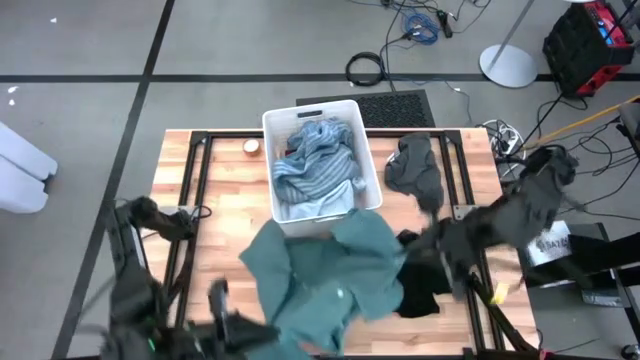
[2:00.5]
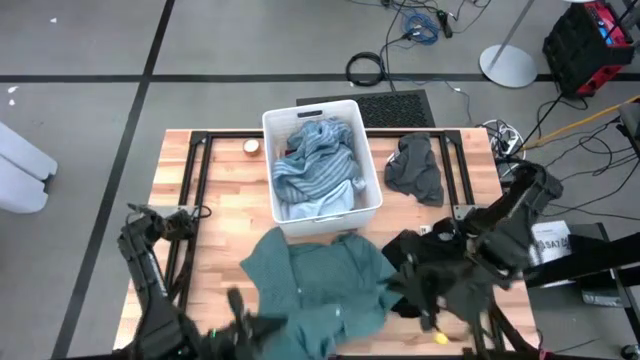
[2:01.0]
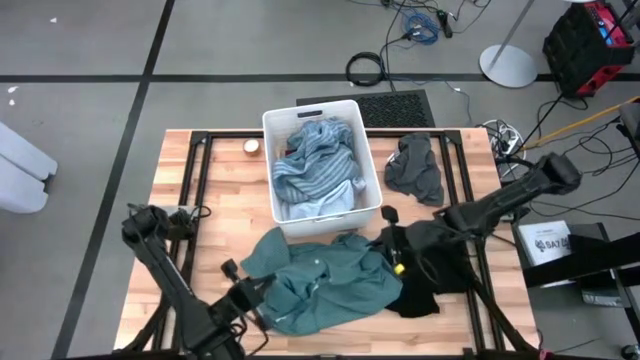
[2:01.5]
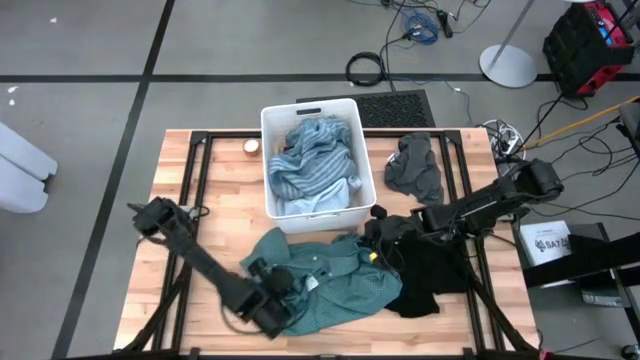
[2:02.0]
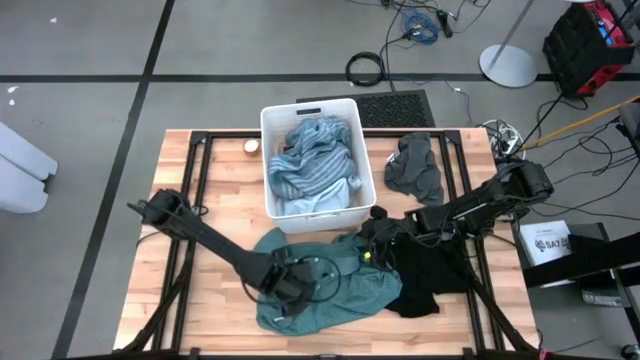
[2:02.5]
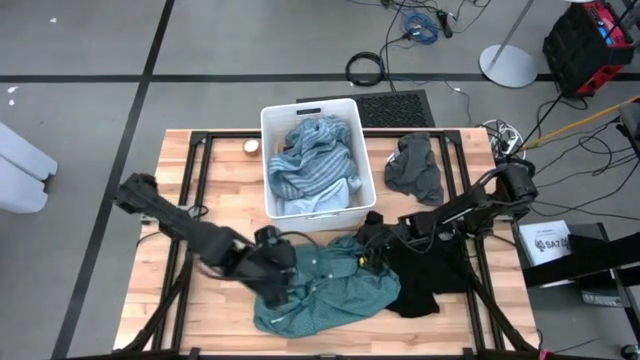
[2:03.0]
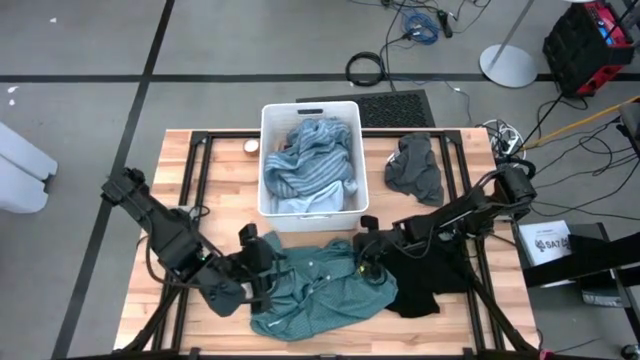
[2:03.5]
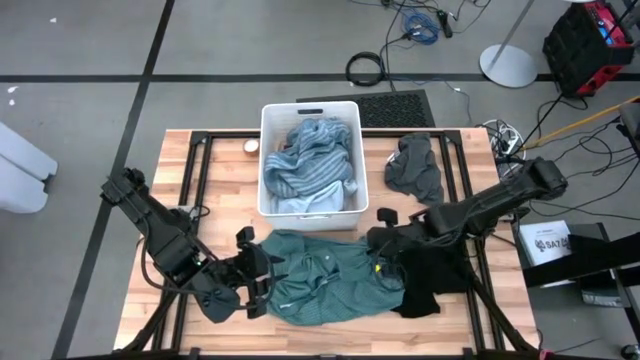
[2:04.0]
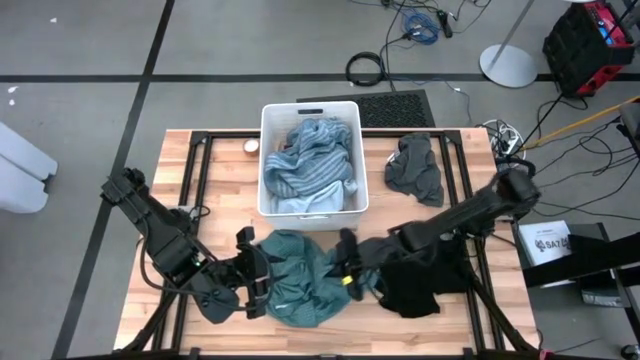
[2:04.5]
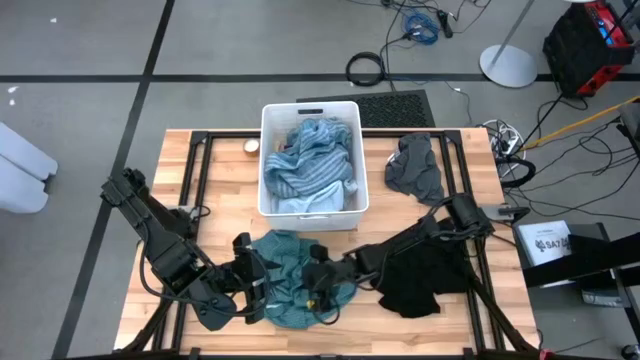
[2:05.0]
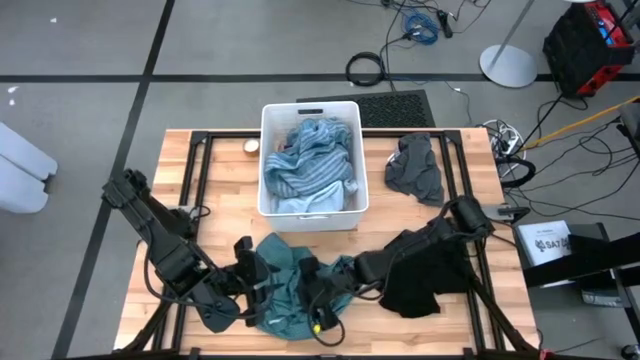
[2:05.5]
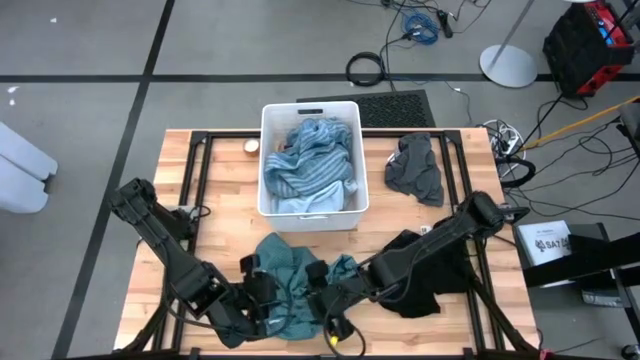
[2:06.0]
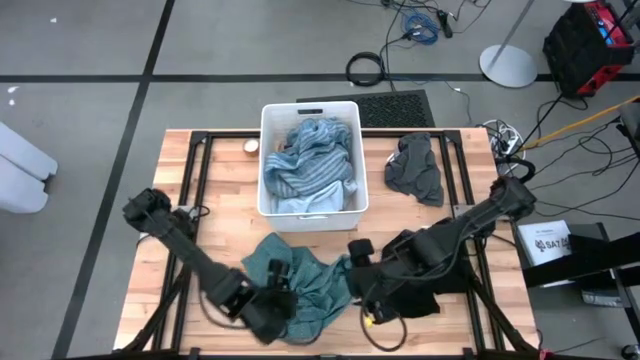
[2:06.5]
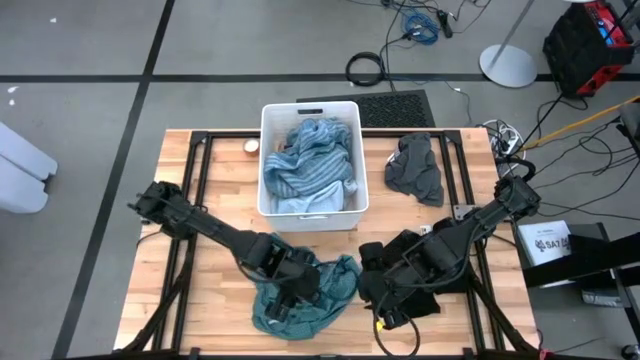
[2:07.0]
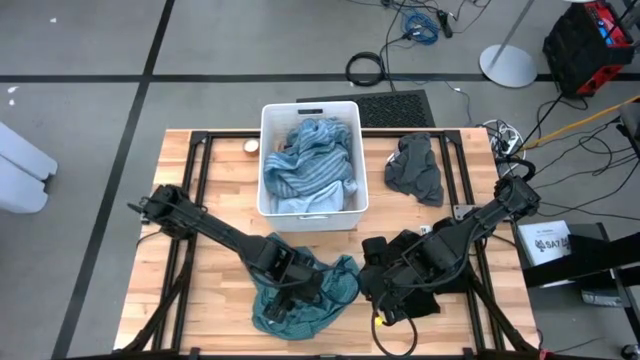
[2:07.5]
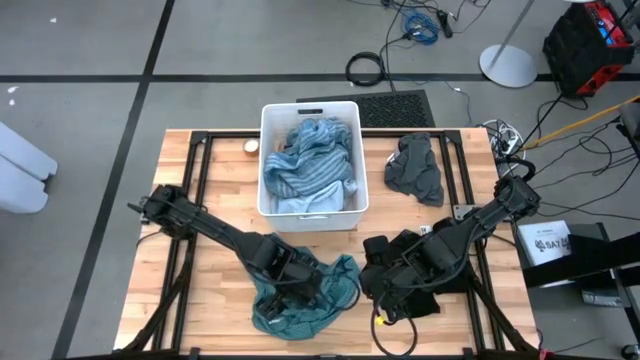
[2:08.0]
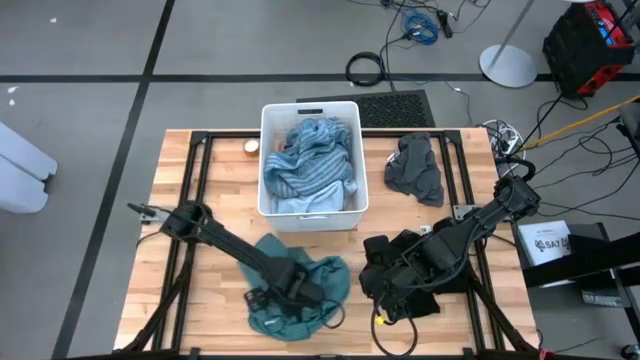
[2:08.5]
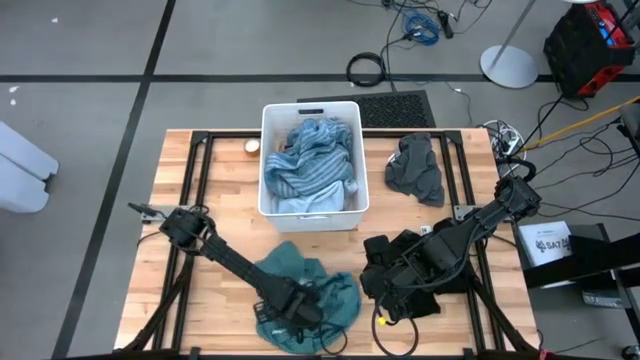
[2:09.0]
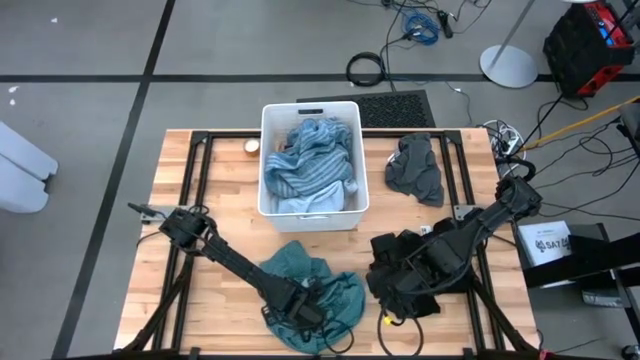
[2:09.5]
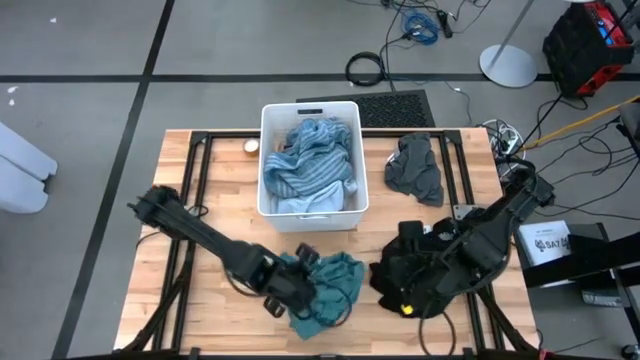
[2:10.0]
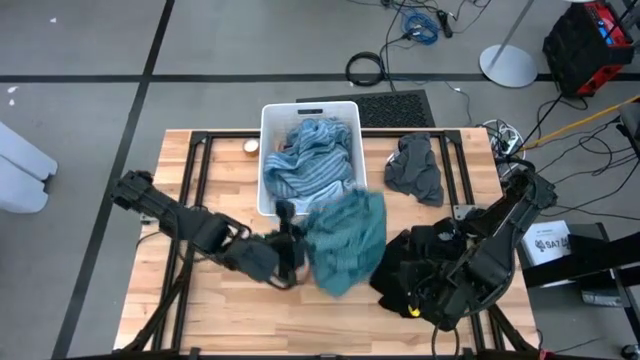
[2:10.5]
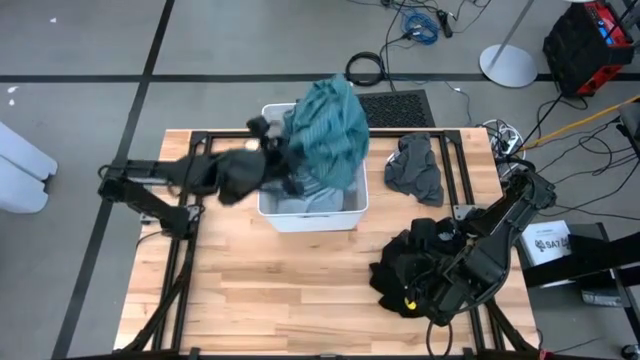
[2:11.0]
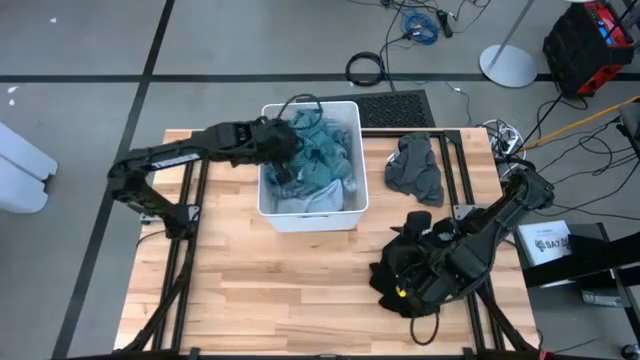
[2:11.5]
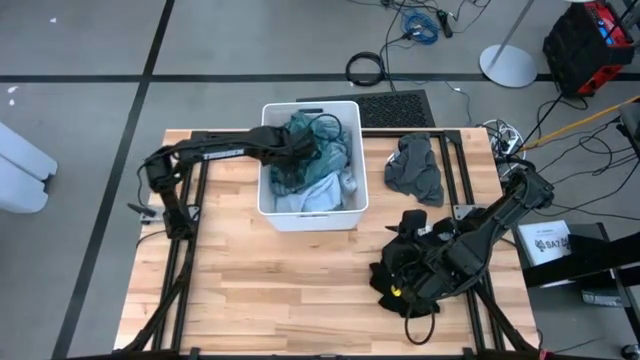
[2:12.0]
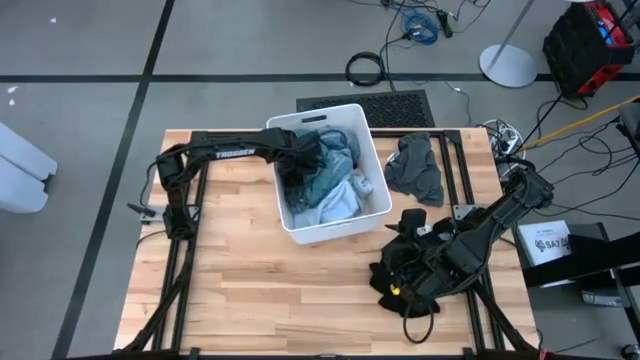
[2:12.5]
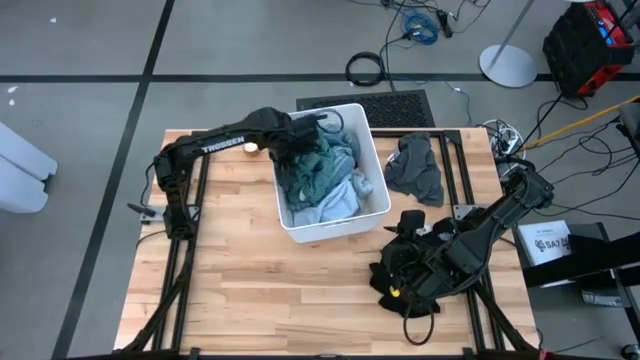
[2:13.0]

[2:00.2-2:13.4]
Task: Sort clothes
Put the green shirt into the white laundry bin

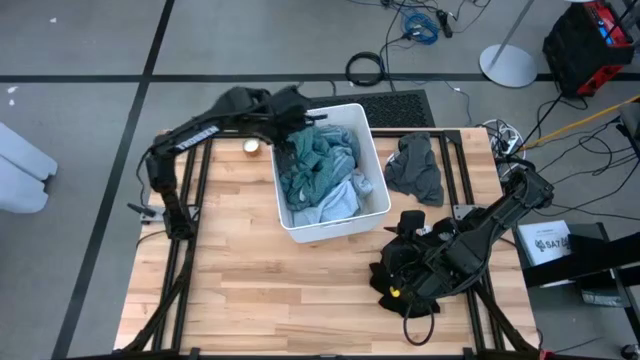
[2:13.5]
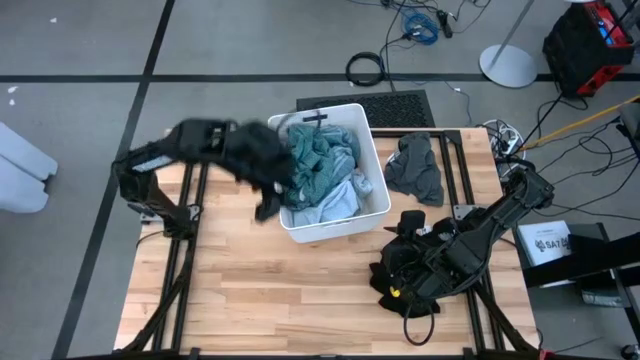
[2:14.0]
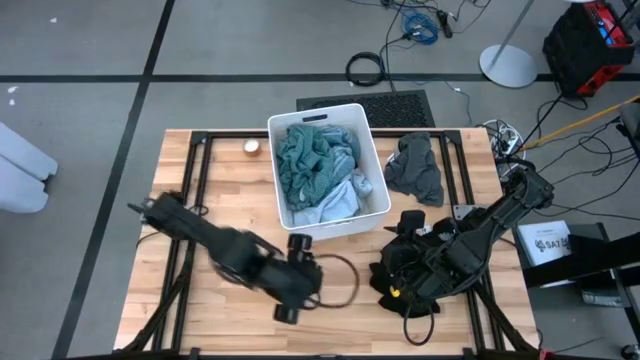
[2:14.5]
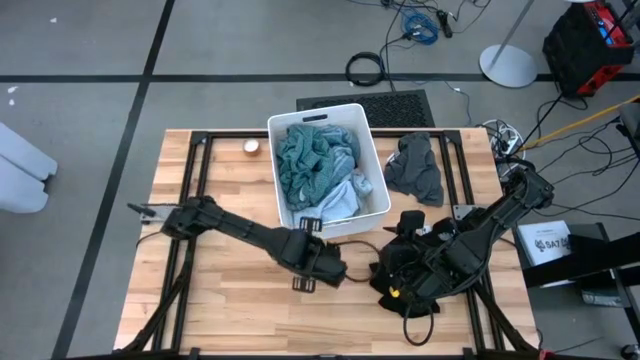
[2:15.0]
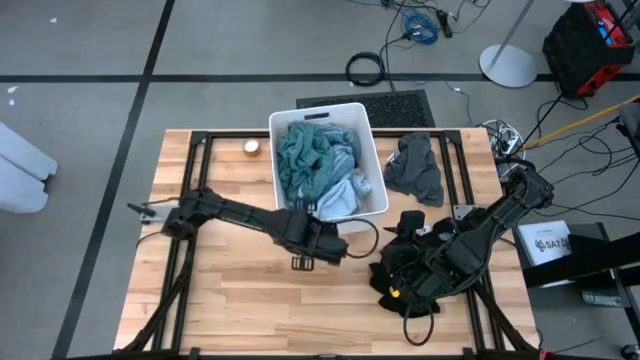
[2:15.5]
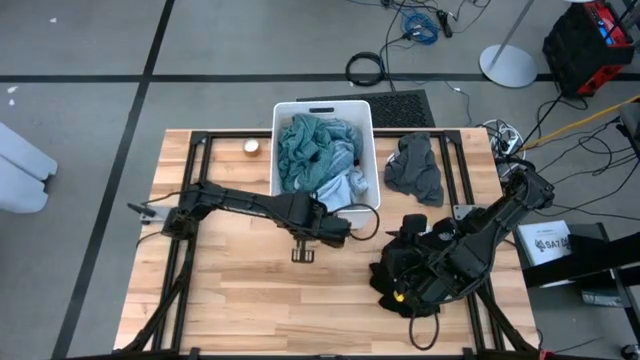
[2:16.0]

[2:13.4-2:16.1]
Adjust the white laundry bin

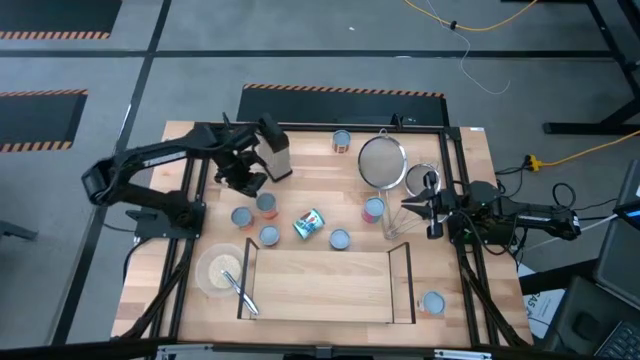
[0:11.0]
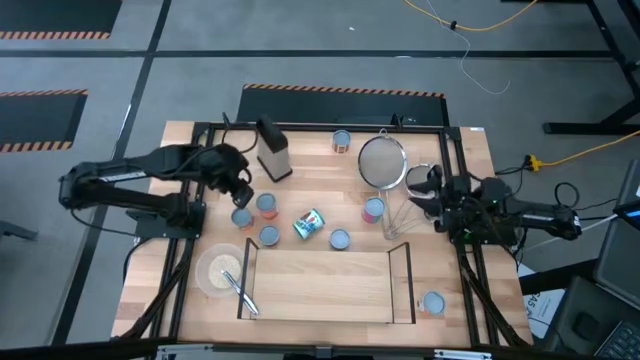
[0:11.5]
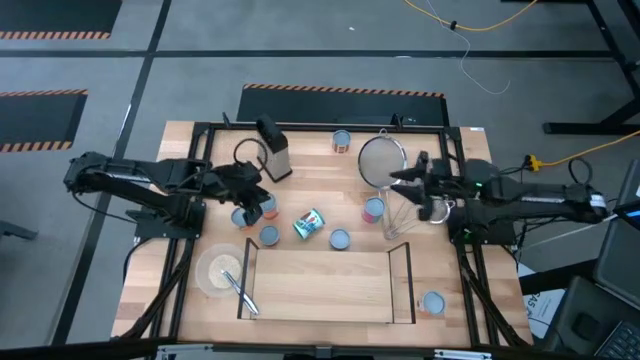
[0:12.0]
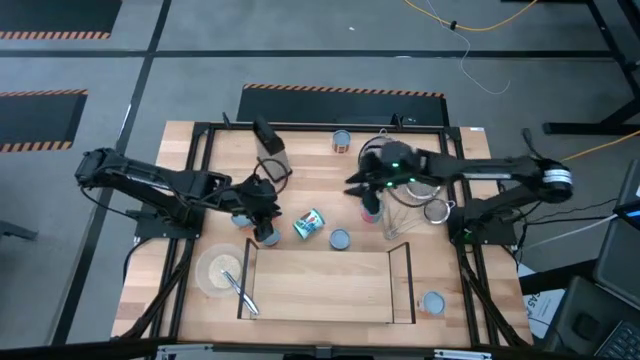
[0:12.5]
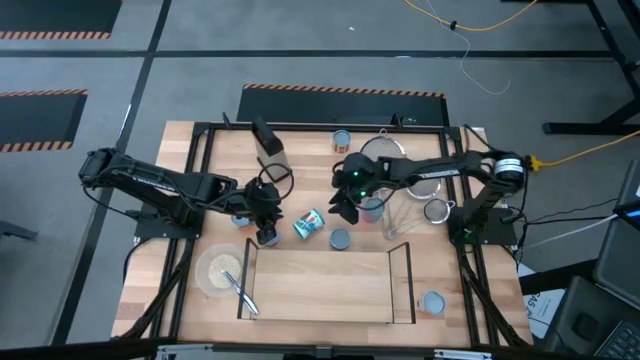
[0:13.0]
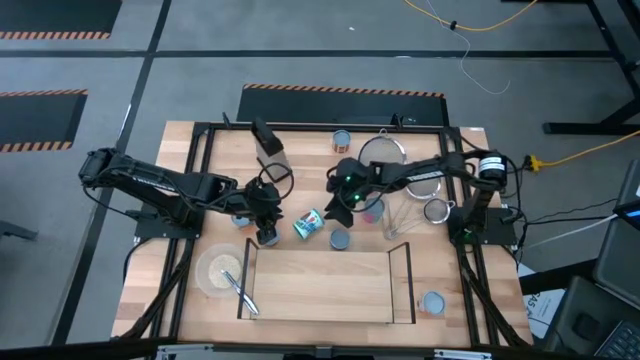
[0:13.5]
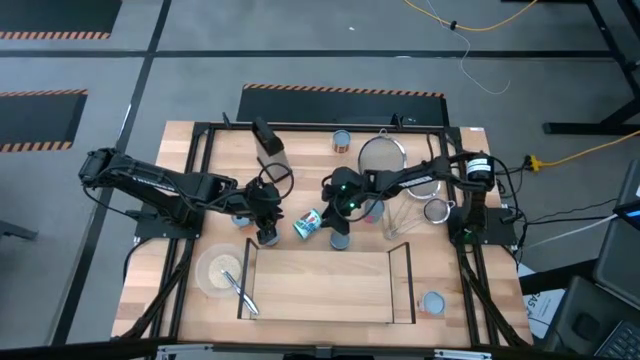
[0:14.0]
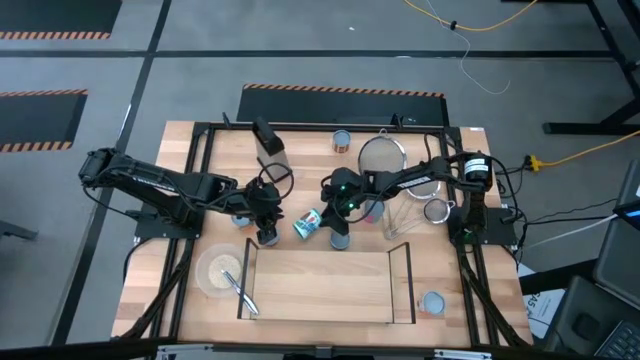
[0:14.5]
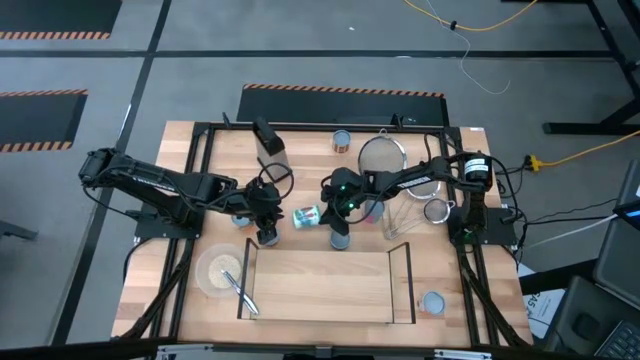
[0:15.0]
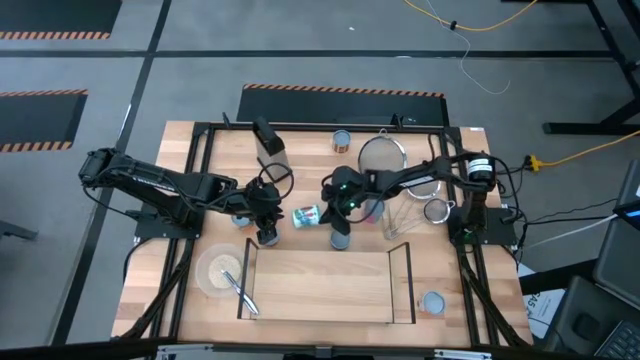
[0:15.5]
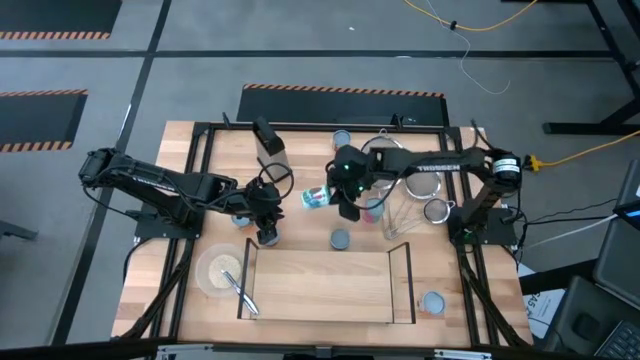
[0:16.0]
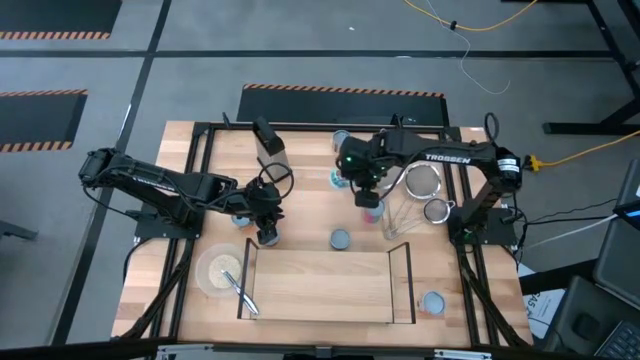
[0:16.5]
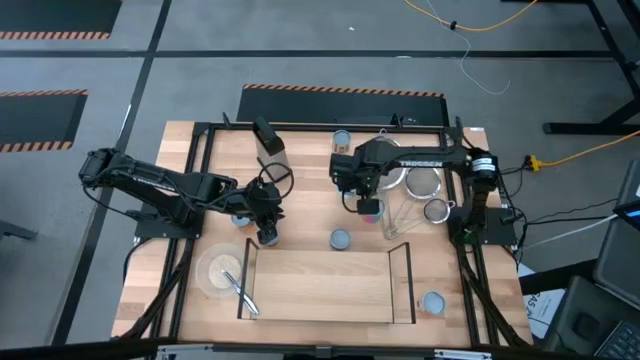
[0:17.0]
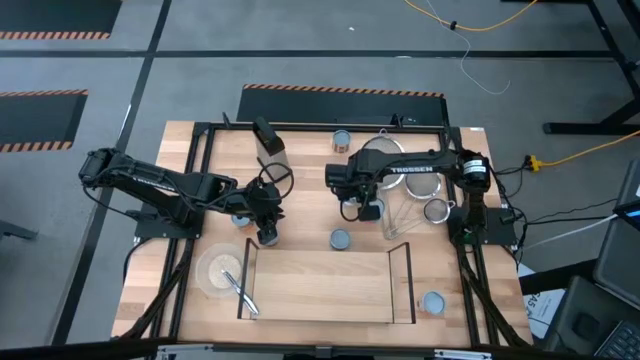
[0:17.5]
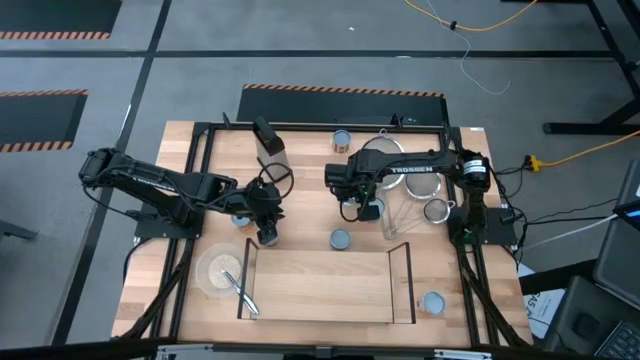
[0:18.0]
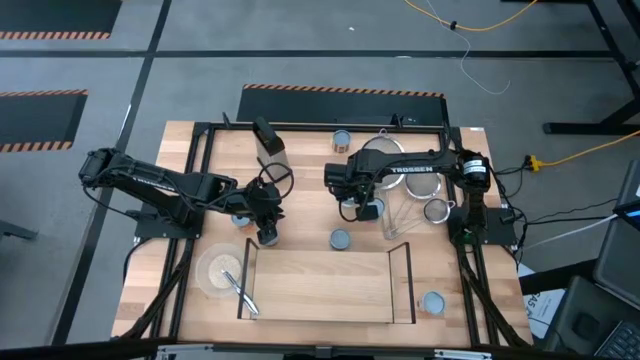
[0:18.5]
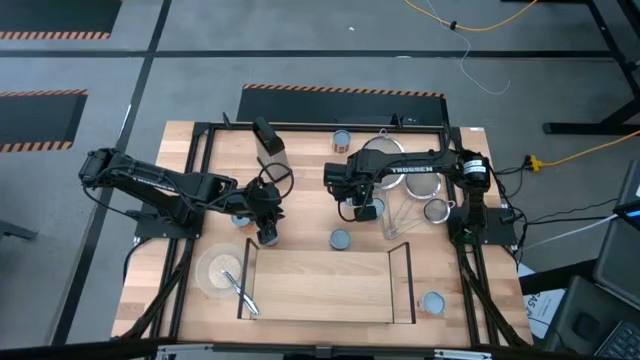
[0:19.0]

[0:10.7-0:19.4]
Task: Pick and place cans onto a shelf
Adjust the white canned mix veggies
